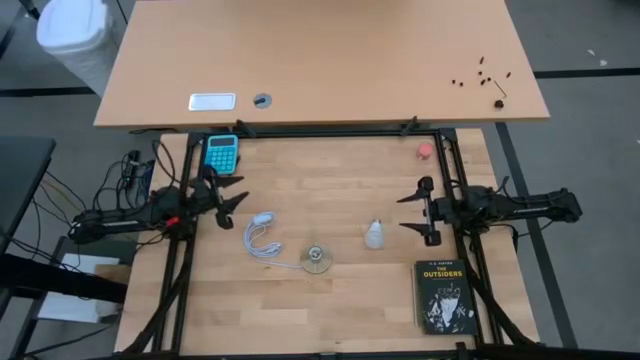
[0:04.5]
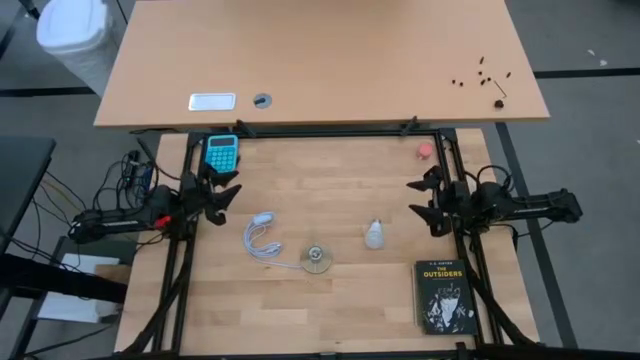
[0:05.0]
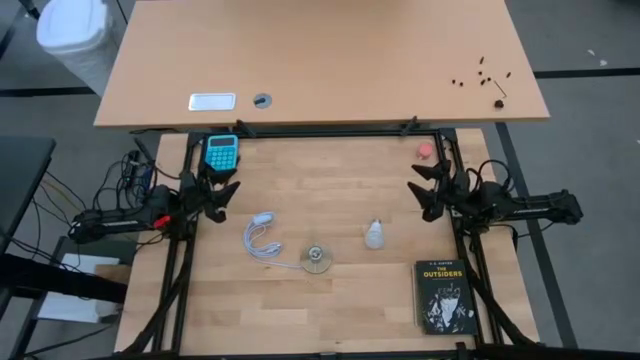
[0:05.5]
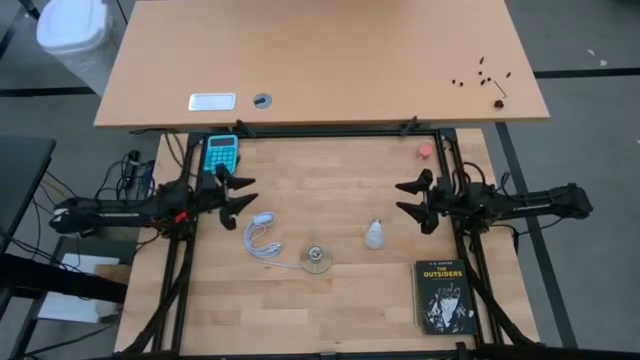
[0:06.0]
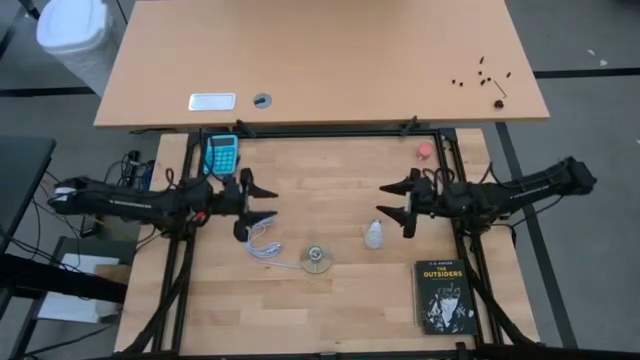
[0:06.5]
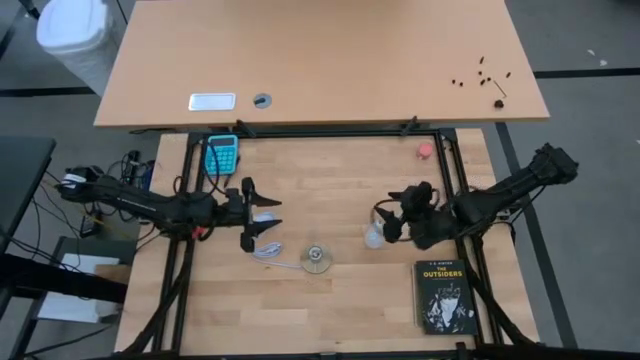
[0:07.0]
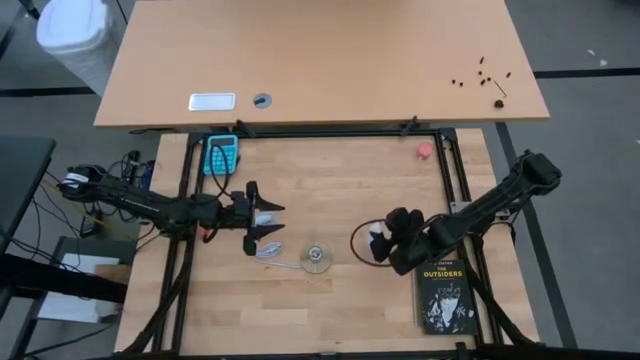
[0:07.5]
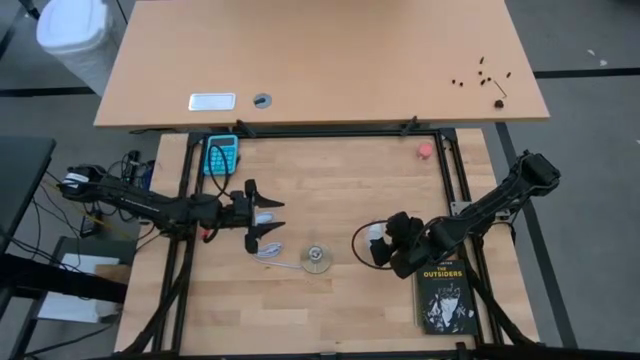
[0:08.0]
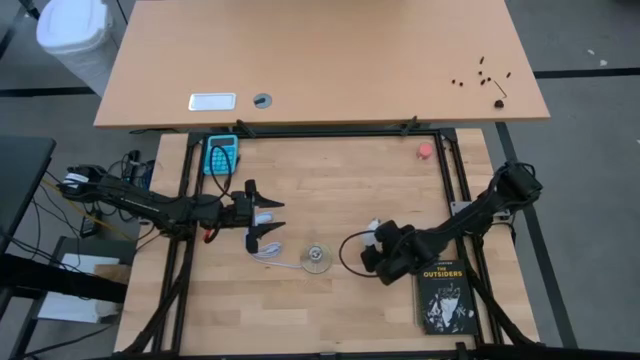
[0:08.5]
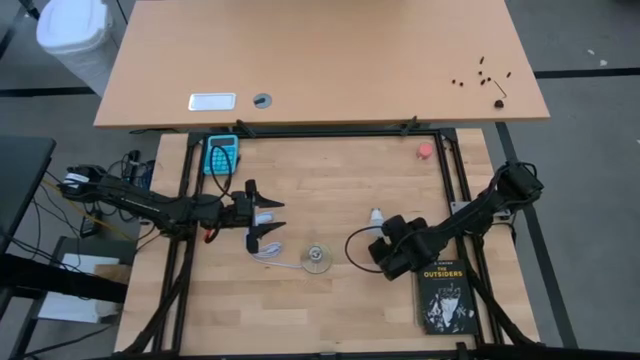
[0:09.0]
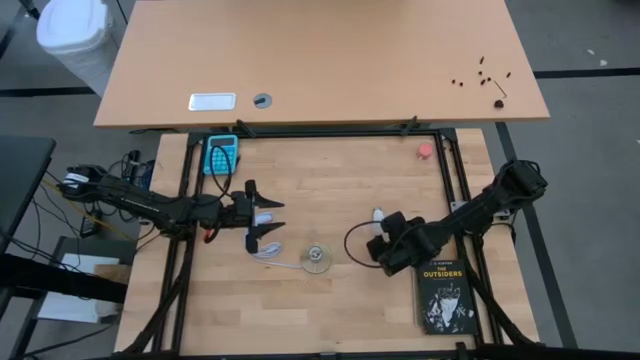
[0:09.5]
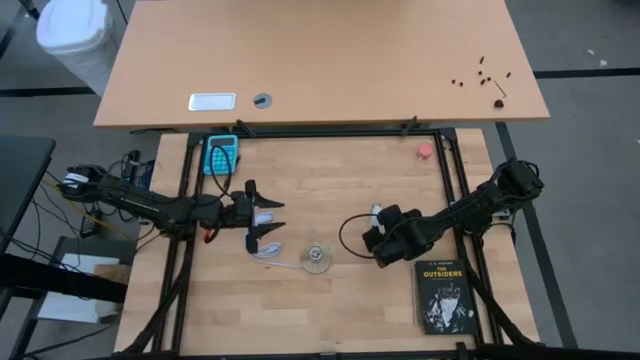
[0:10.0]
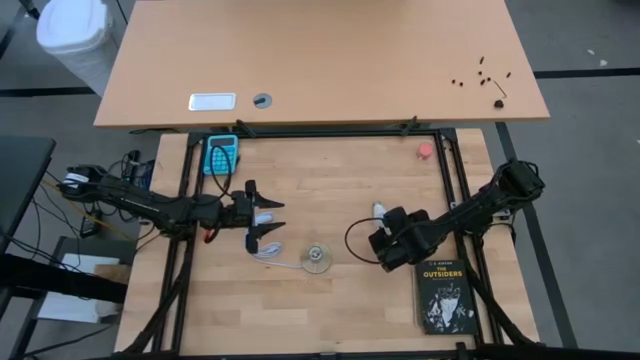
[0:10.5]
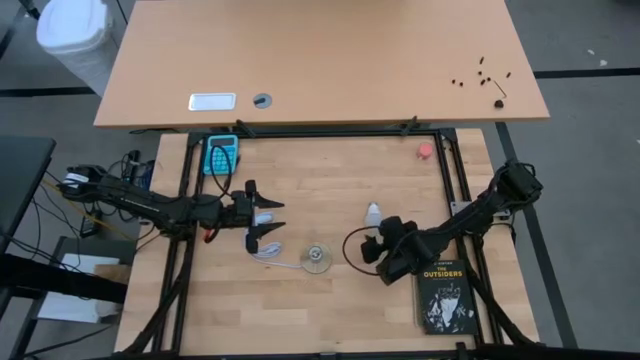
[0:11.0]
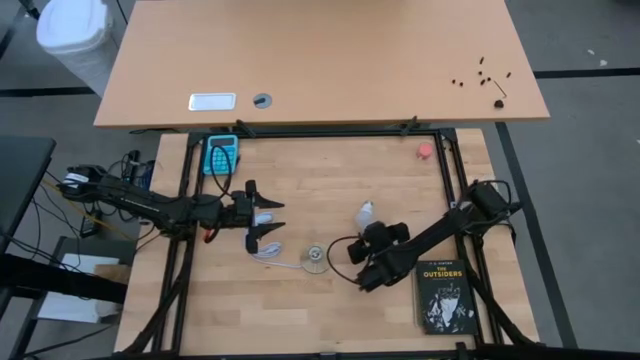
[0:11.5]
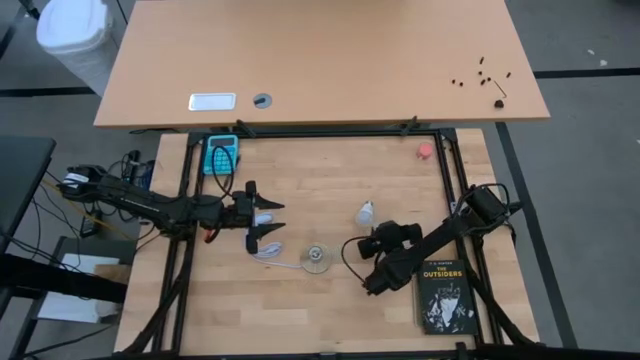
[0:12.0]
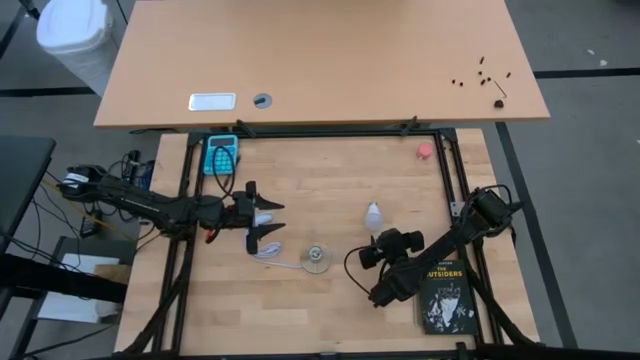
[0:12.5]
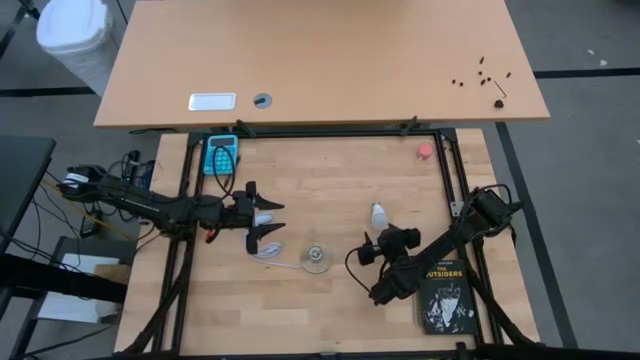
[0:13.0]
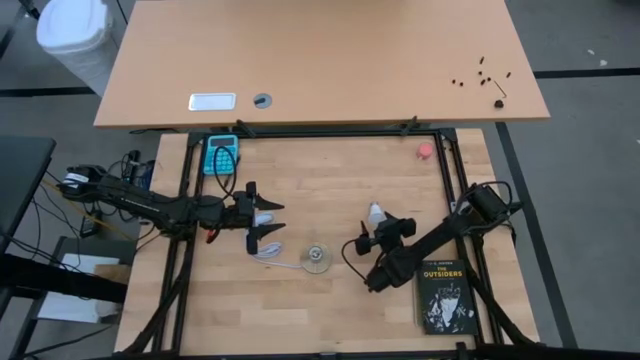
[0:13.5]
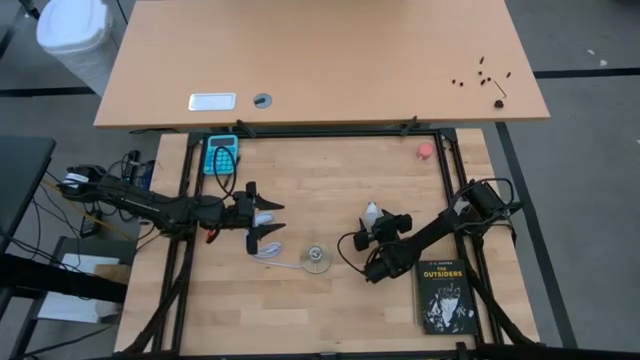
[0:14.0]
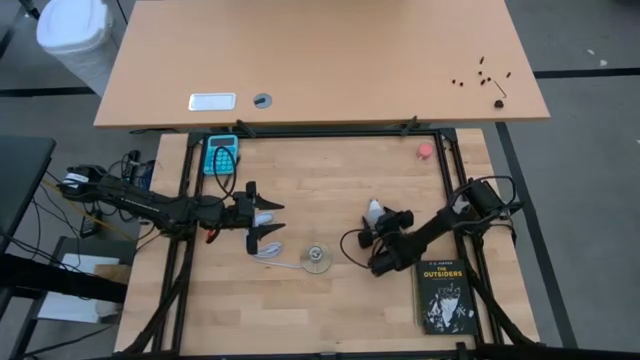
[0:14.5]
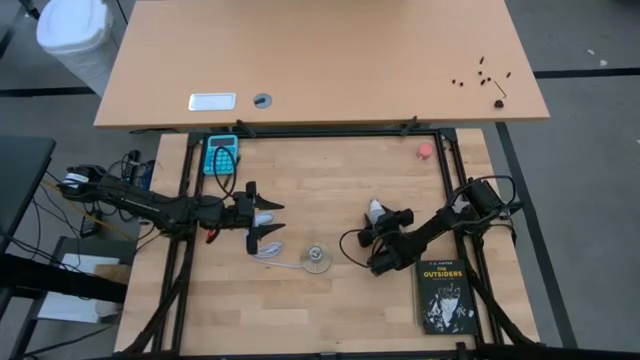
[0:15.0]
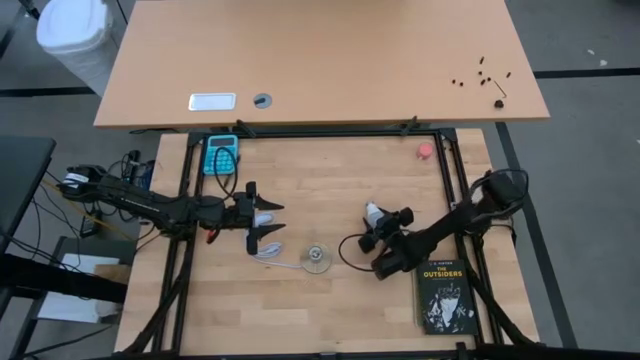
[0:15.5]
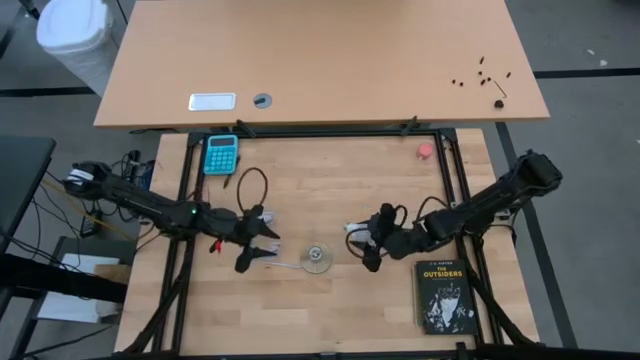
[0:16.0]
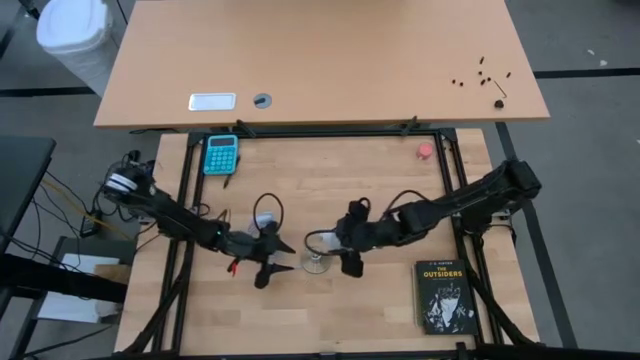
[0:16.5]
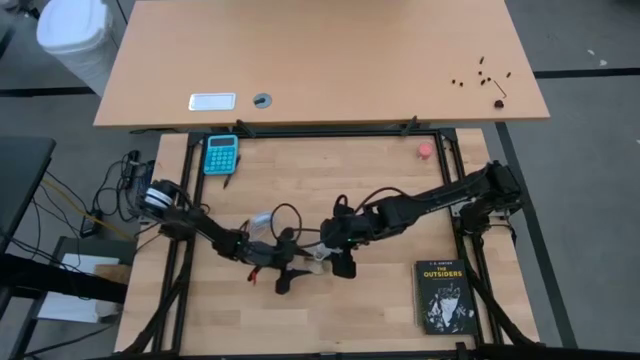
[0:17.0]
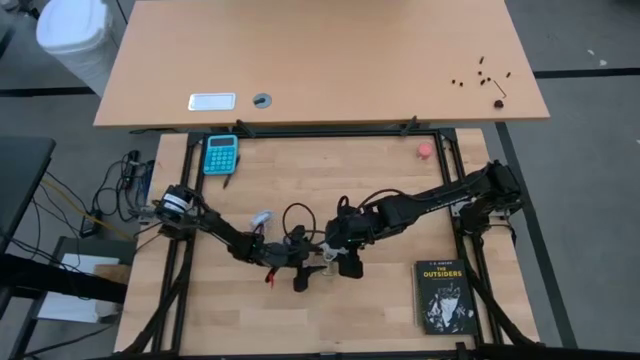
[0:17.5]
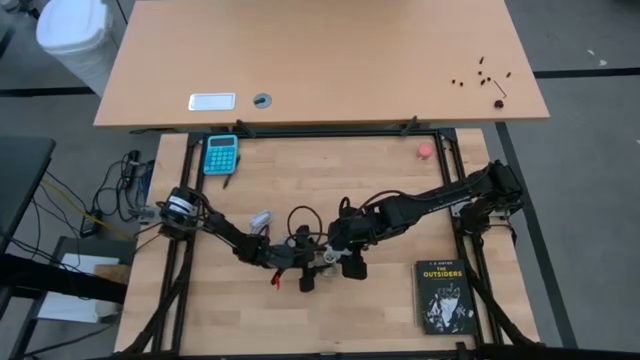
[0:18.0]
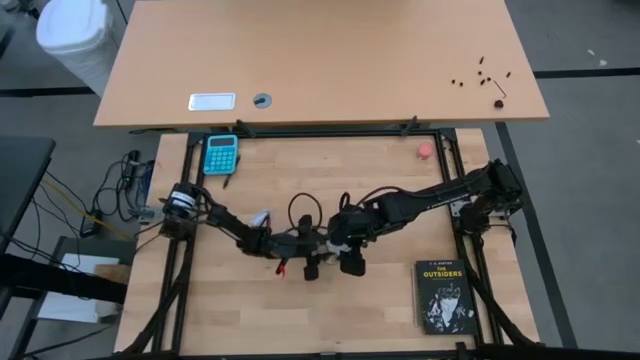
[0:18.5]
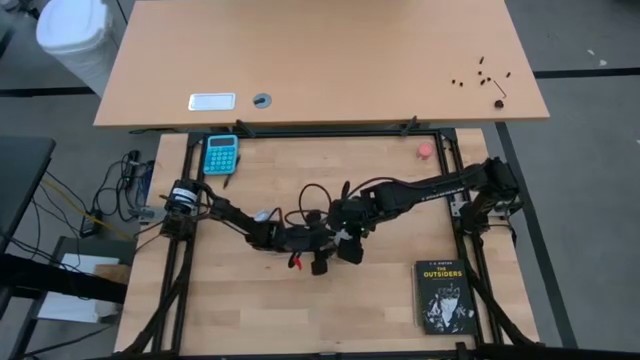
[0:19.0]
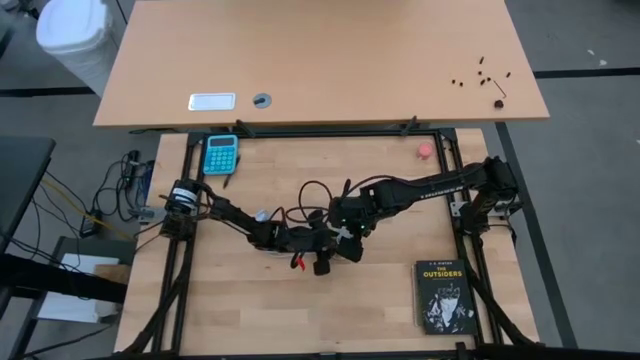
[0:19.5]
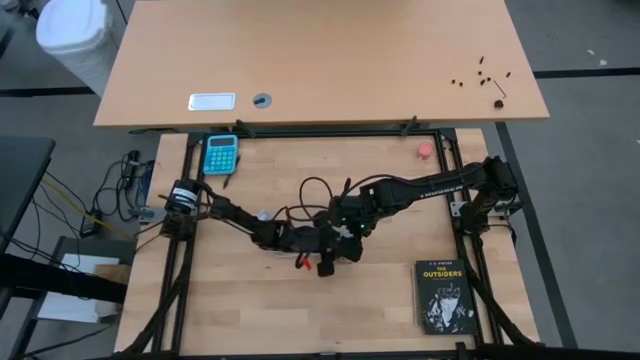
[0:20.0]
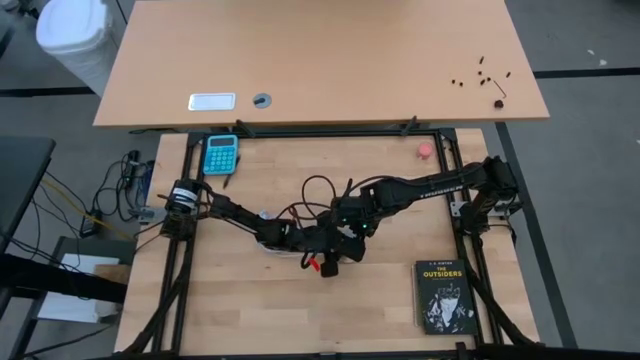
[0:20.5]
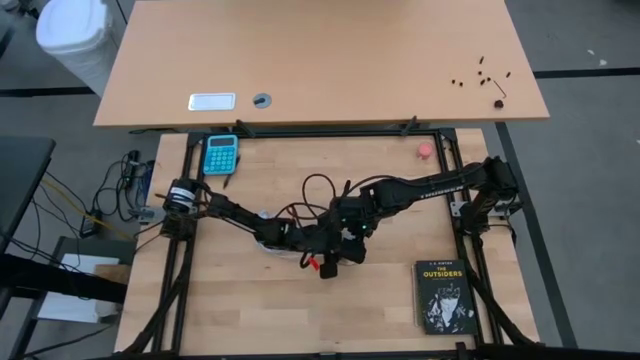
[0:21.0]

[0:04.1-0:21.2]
Task: Screw lightbulb
Insert the lightbulb into the lamp

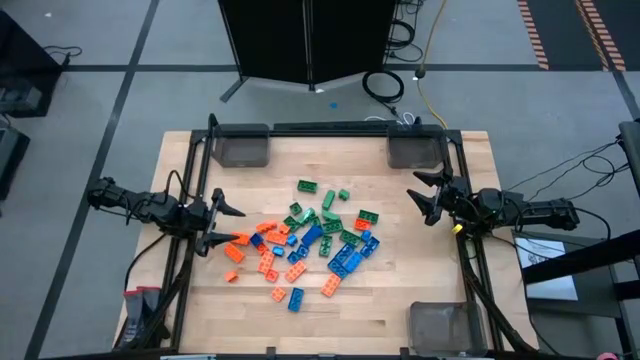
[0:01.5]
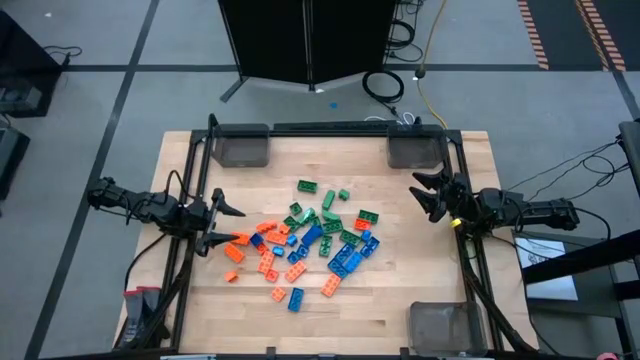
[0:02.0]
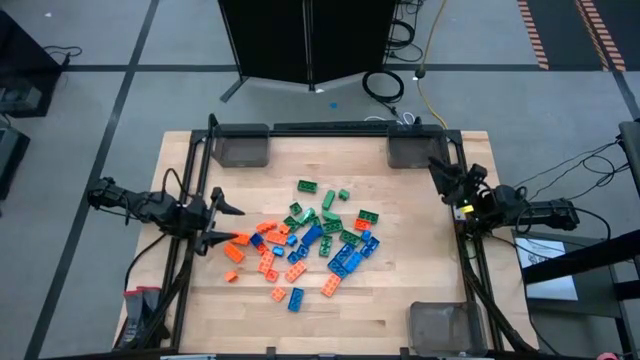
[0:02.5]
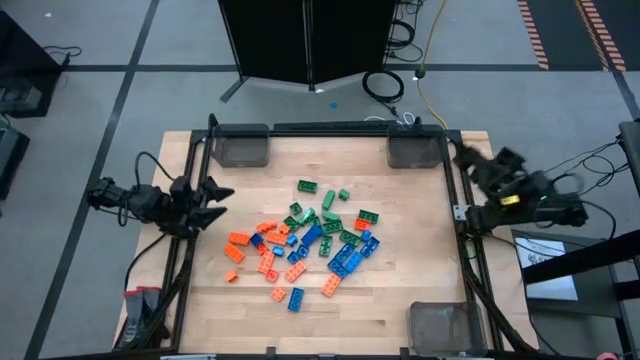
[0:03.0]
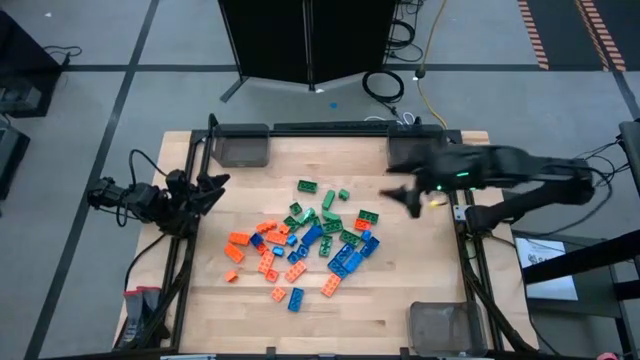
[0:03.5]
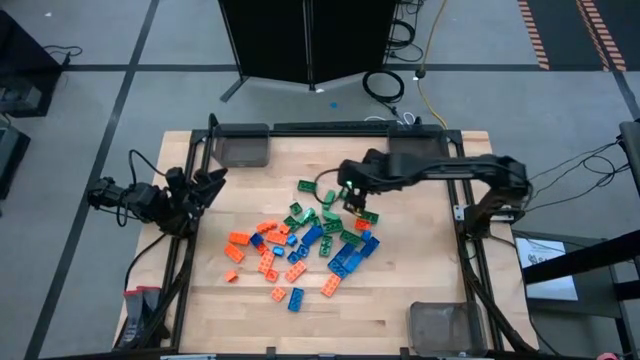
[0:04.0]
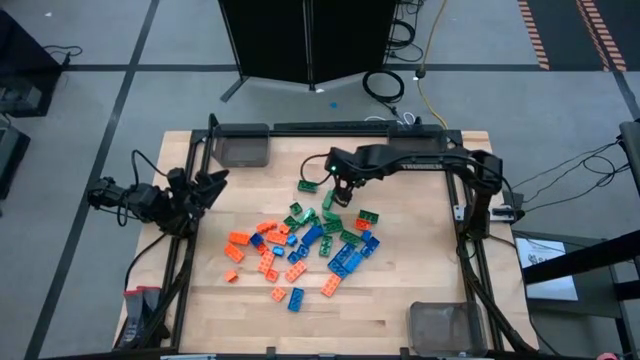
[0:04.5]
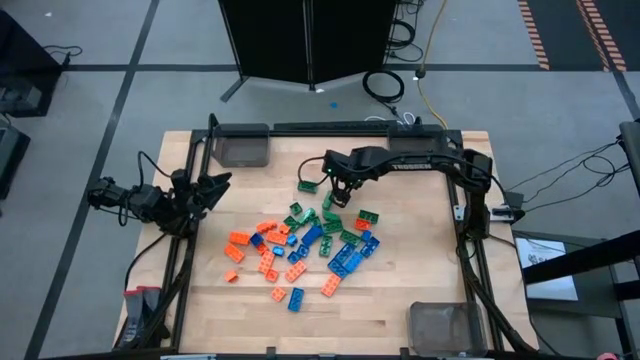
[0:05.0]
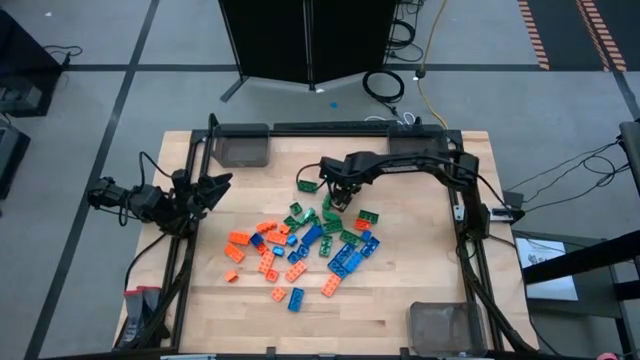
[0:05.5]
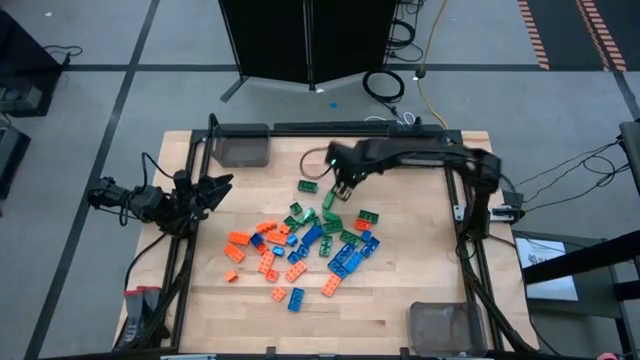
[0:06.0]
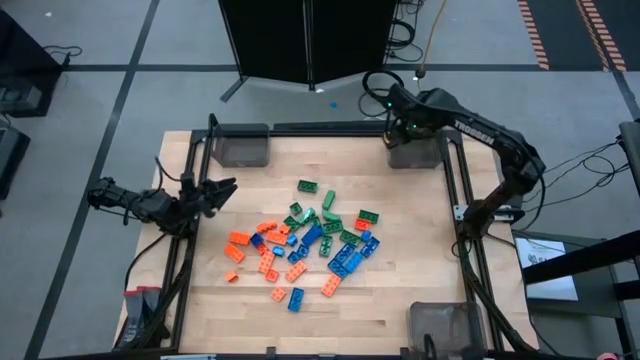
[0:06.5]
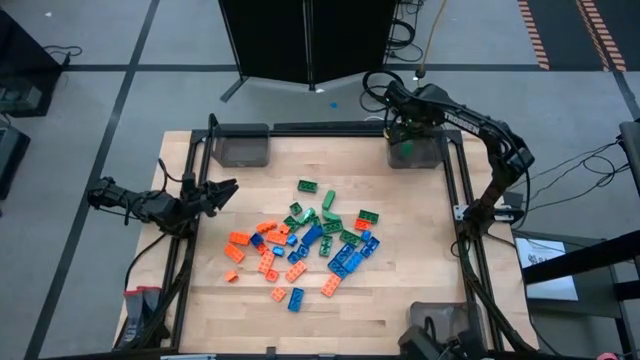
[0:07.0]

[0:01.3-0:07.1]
Task: Sort blocks
Put the green game piece into the top right black bin
